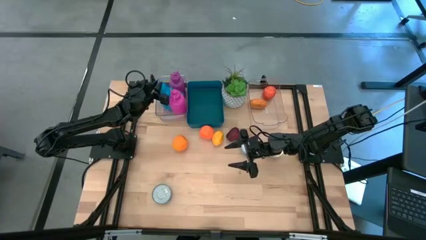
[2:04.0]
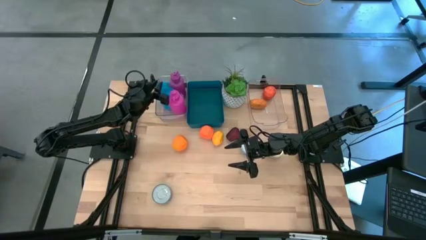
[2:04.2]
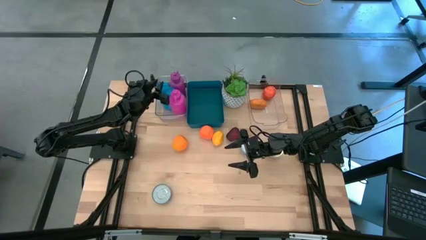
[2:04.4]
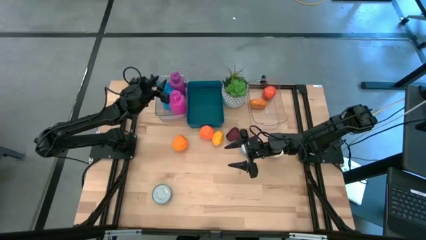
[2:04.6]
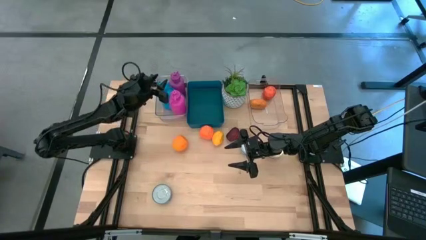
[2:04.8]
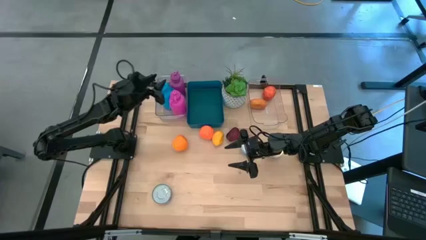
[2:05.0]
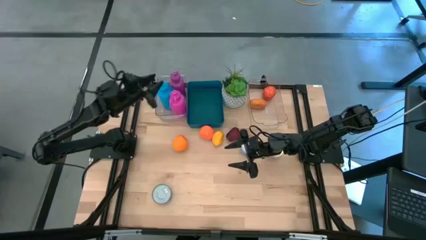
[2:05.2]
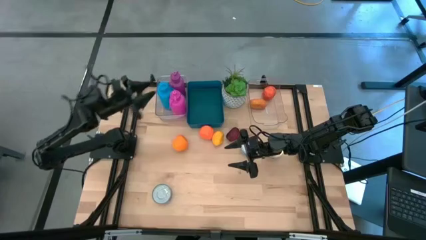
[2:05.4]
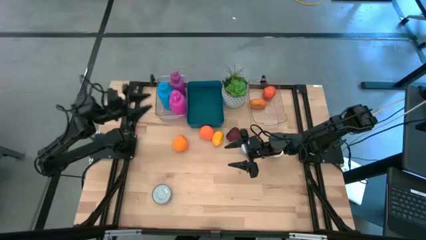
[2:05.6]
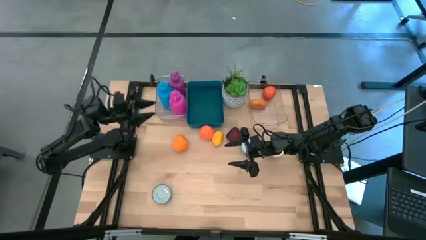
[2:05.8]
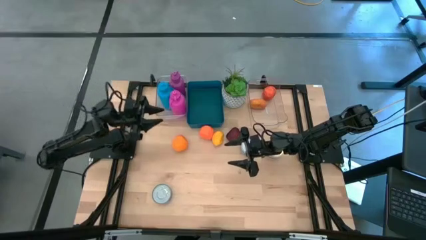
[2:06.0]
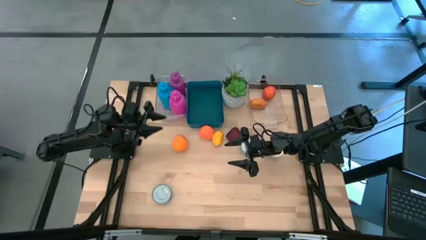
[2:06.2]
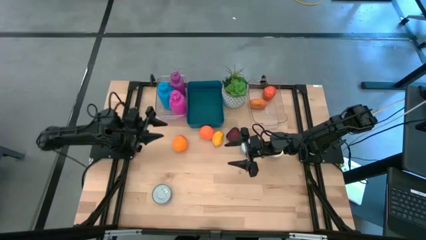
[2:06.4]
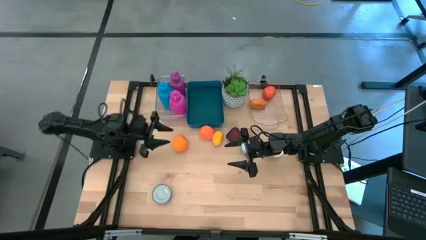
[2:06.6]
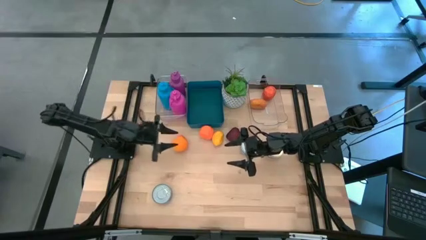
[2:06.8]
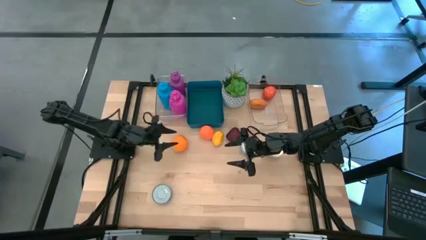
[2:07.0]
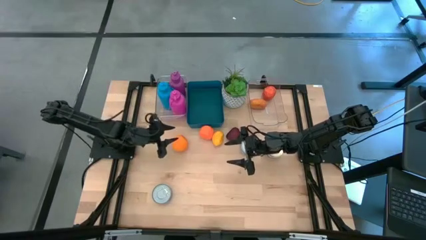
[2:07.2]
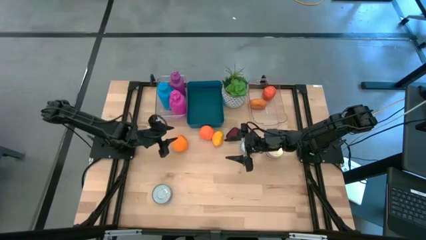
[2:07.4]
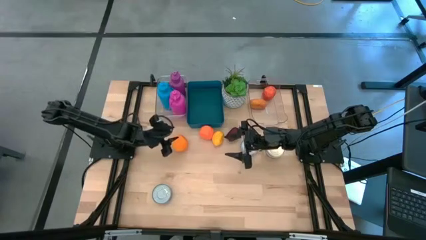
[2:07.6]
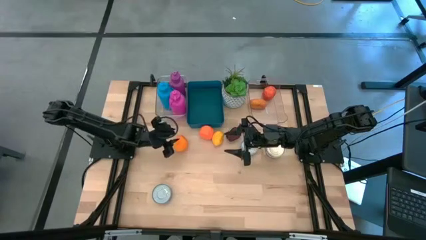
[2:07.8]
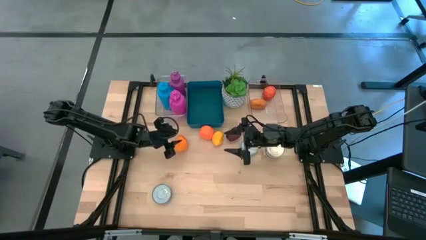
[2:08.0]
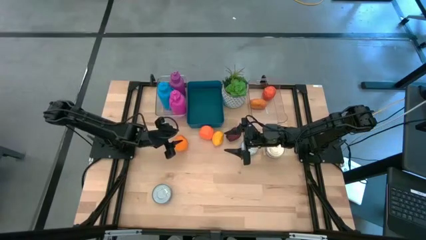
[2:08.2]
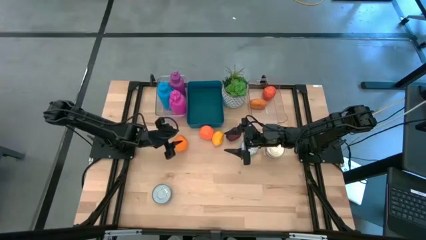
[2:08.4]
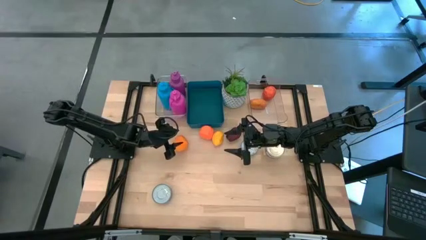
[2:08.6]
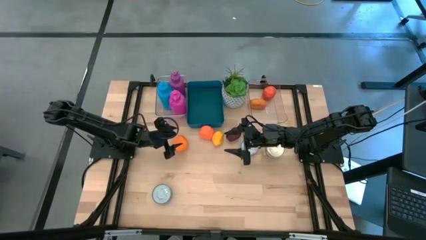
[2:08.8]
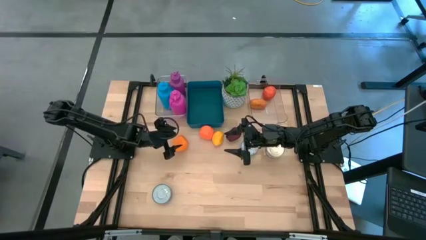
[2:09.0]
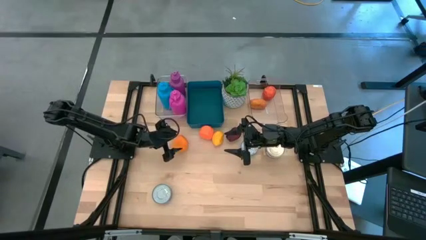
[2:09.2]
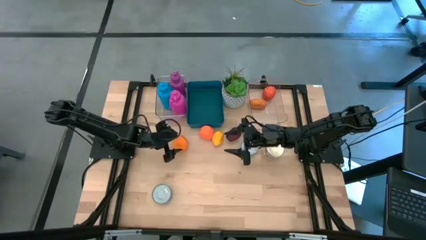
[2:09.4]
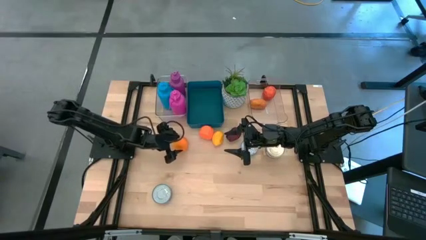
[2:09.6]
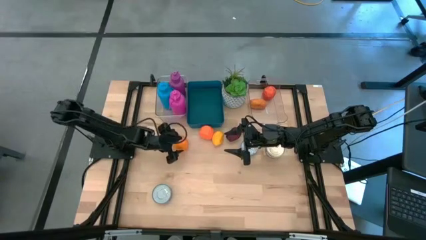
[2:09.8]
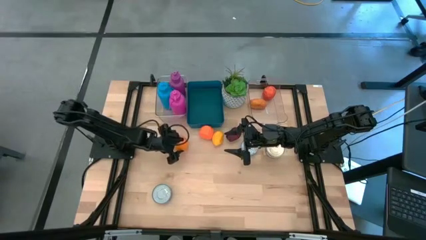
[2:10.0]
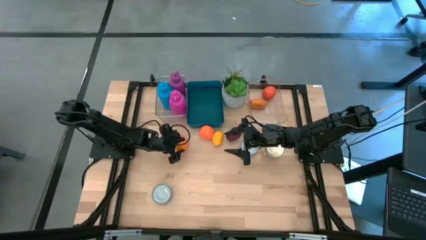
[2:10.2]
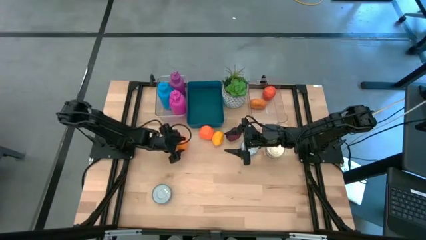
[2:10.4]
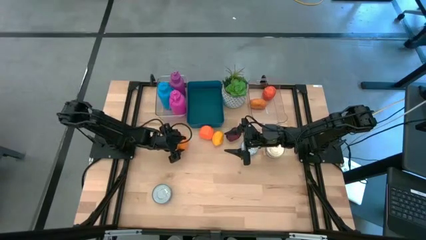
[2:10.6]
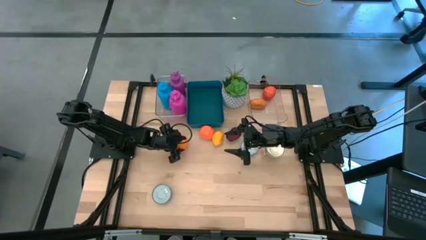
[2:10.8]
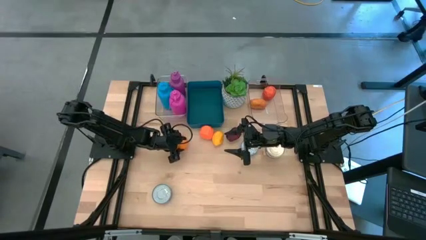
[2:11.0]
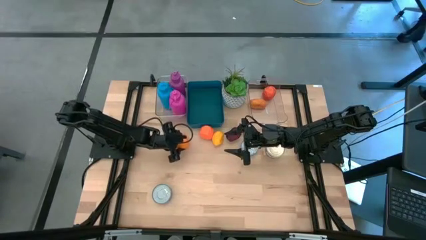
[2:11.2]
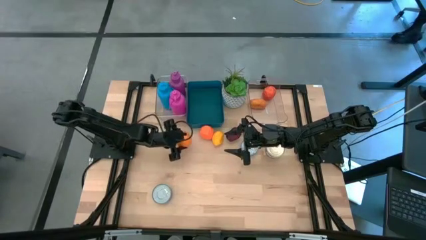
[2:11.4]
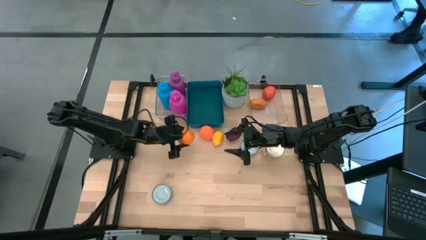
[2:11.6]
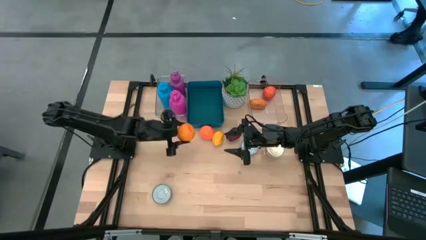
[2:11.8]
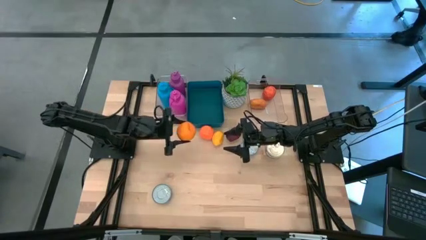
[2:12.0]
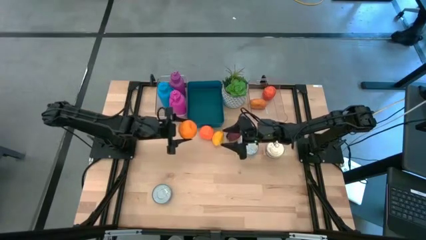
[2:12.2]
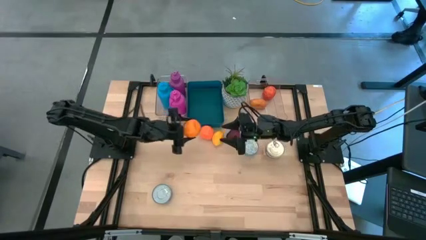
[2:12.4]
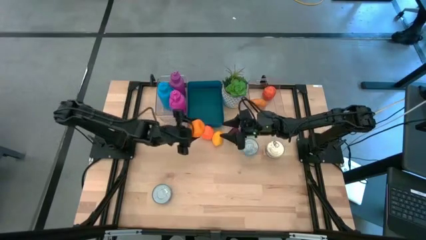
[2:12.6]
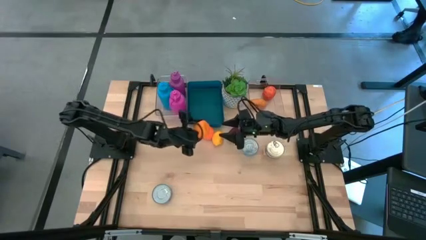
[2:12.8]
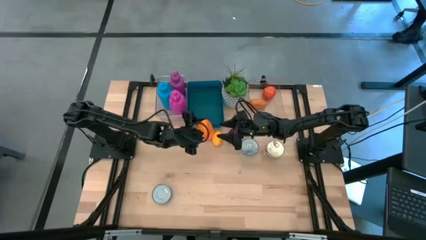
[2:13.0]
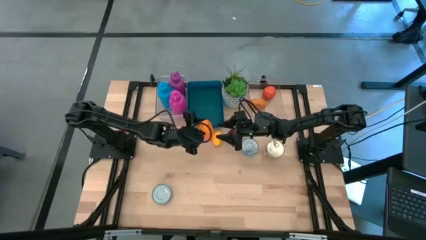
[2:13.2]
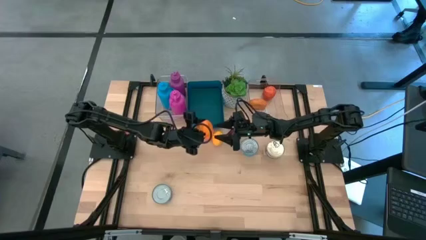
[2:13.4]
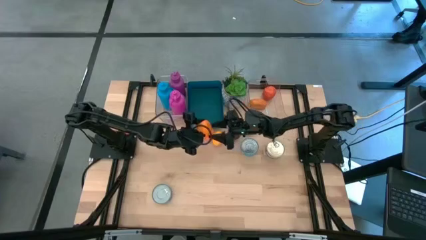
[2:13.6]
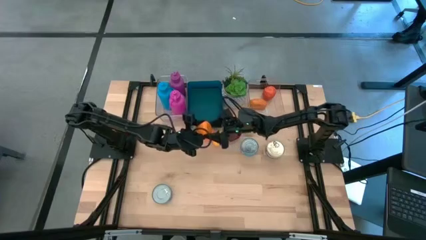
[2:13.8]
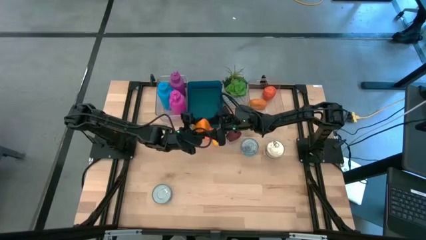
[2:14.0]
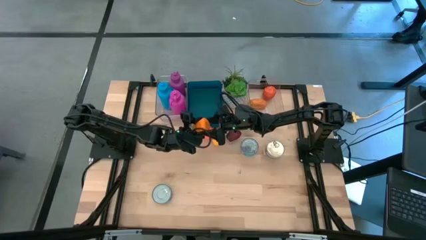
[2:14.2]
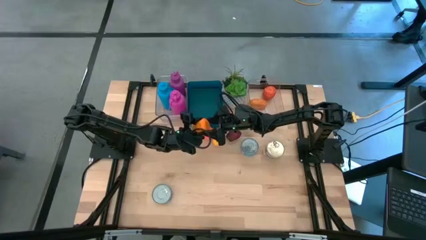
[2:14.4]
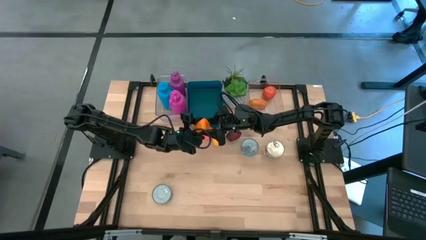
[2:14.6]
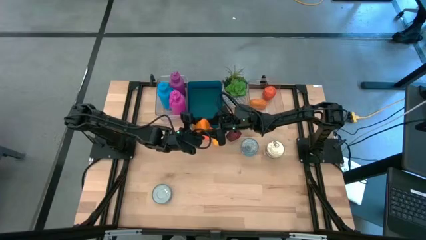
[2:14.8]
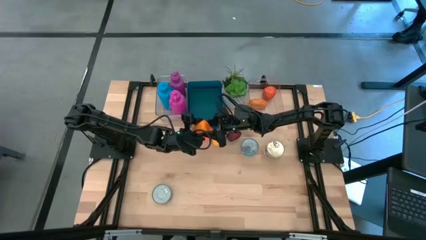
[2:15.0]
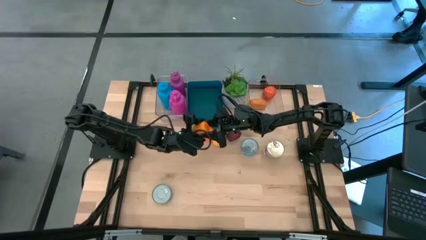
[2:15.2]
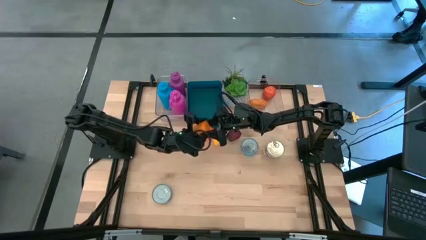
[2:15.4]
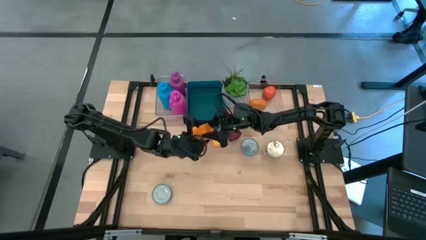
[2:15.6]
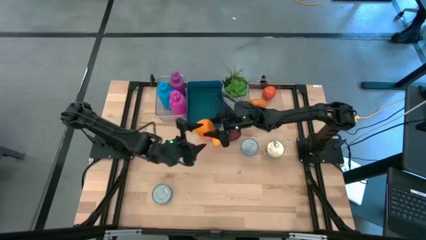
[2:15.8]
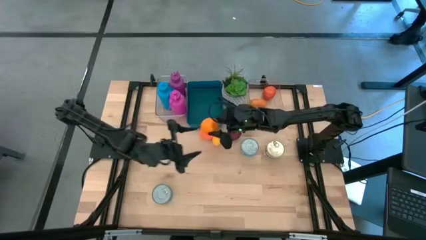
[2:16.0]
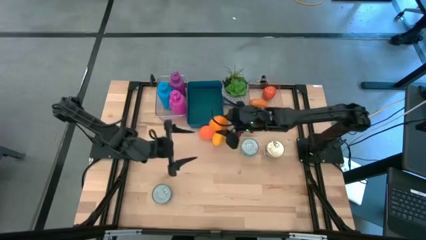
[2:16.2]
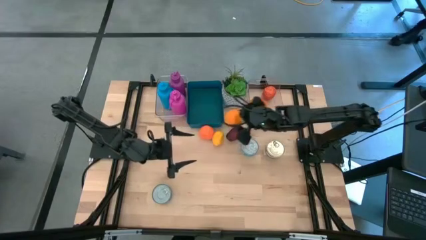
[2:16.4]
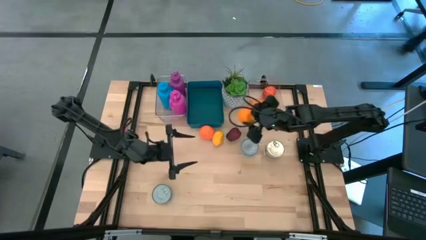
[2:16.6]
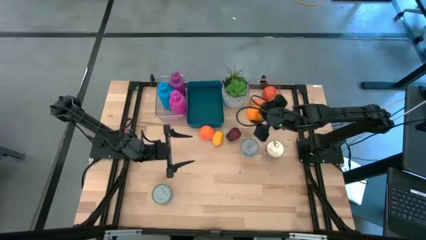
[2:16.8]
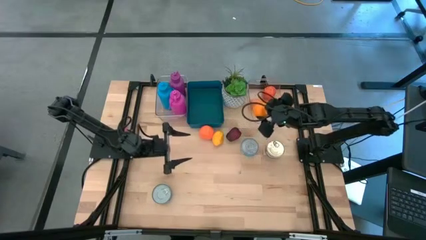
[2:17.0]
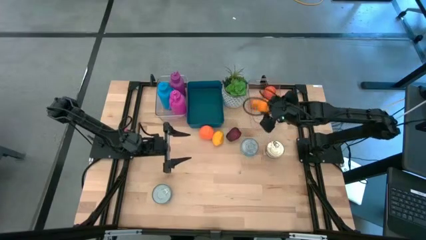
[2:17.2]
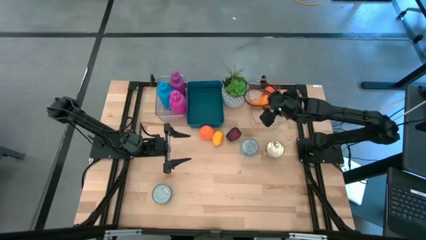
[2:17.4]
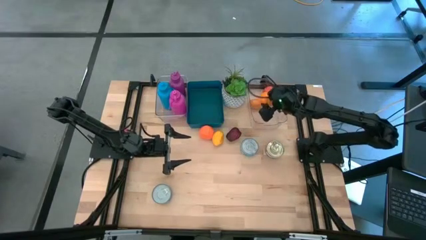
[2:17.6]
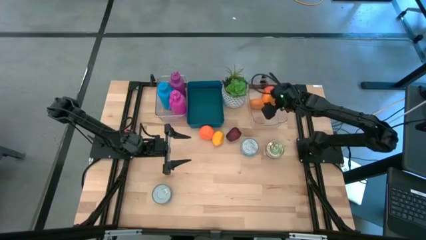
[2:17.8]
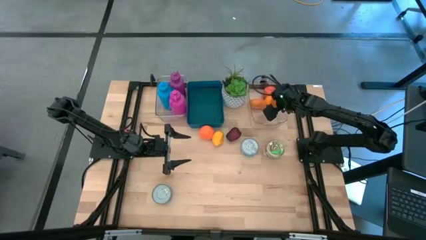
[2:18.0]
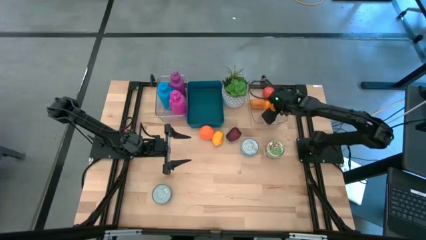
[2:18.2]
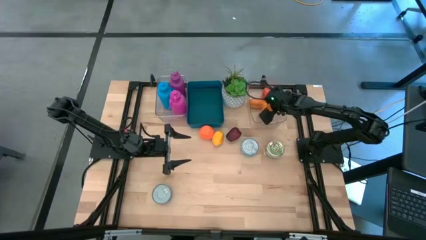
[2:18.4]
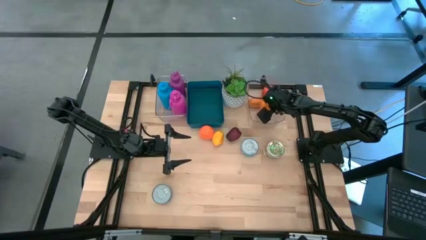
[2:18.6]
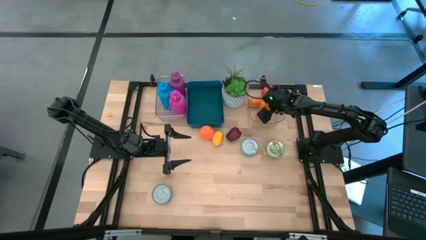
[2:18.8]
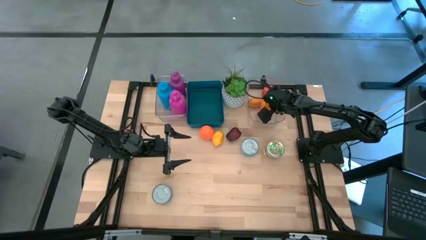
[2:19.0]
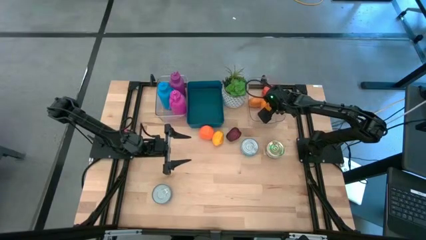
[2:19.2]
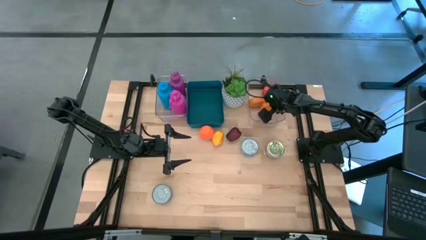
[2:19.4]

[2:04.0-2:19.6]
Task: Pick & Place Food Item
Put the left orange into the right transparent bin

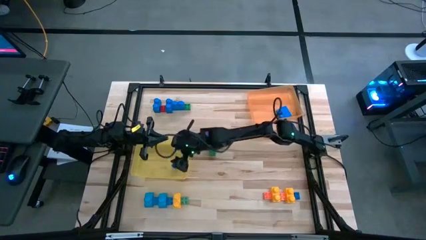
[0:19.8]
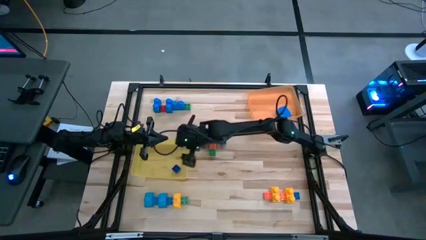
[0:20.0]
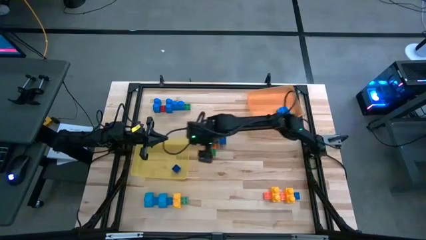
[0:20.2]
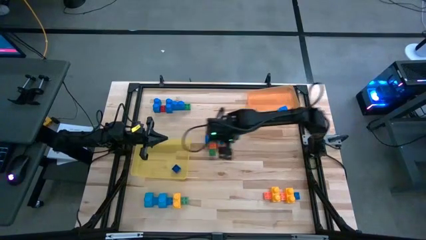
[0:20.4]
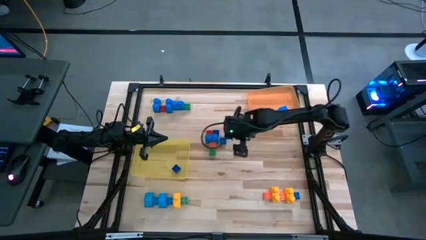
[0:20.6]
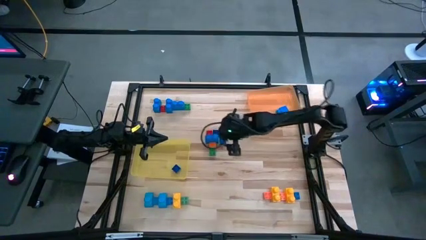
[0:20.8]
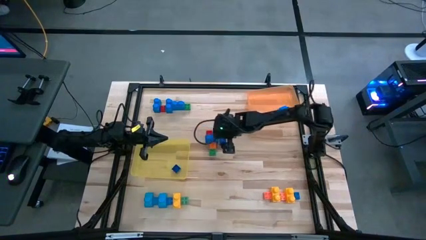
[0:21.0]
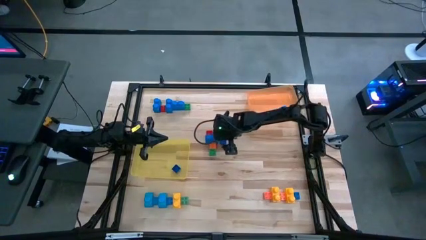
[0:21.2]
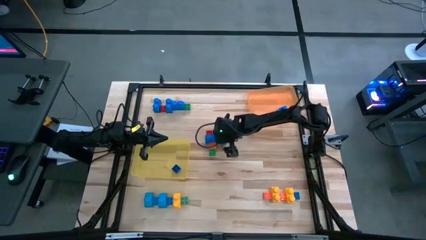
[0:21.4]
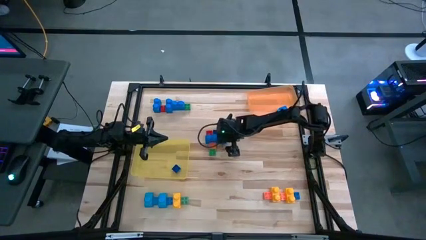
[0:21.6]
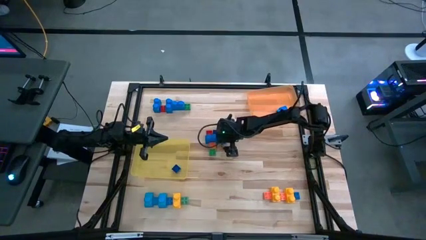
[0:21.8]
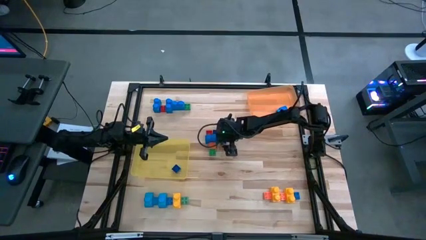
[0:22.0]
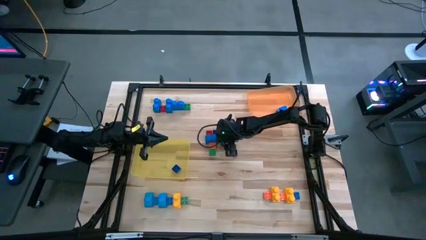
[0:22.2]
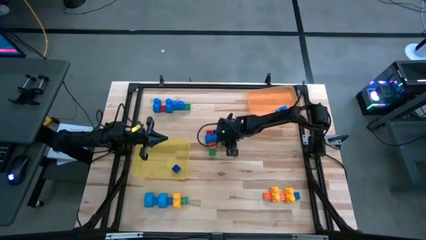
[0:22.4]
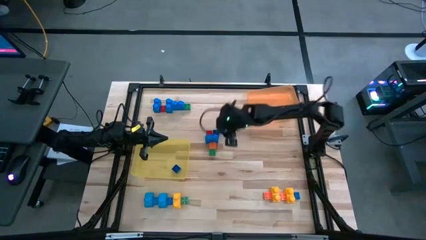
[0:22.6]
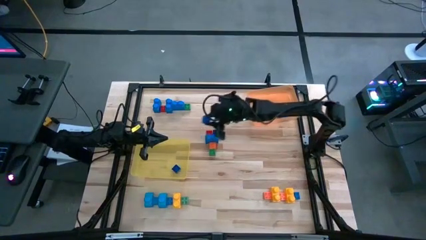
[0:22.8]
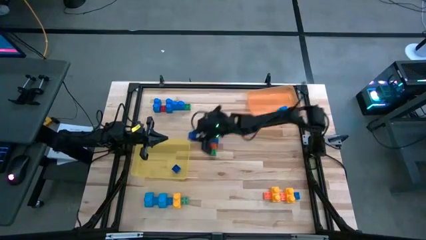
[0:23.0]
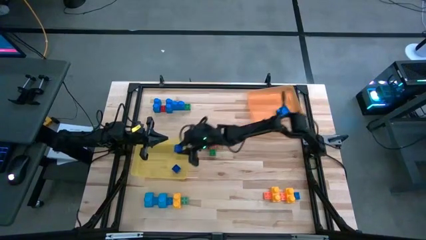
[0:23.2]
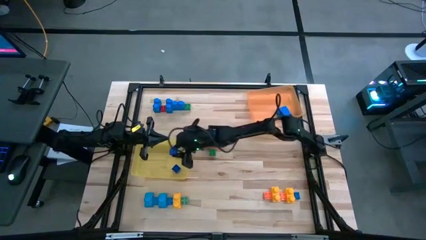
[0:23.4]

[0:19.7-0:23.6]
Task: Sort blocks by size
Put the small blue 4 stud game piece into the yellow bin
